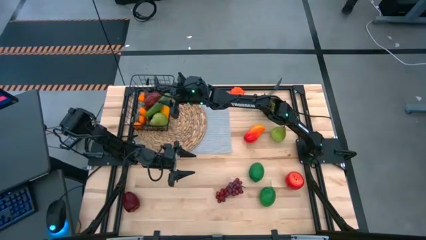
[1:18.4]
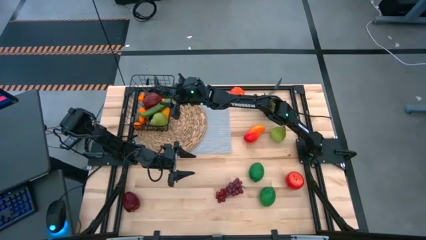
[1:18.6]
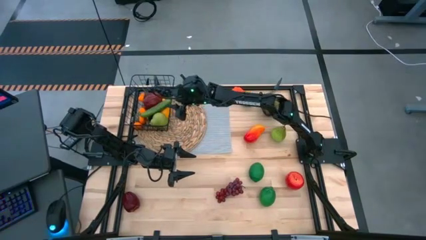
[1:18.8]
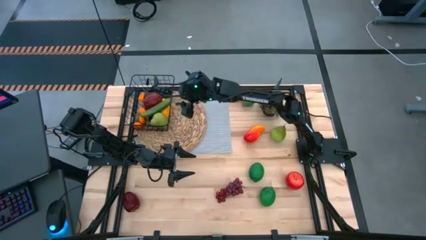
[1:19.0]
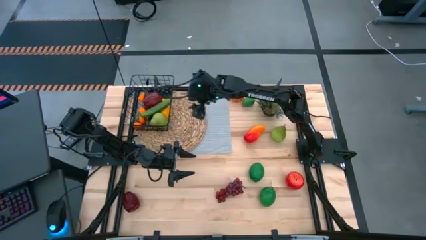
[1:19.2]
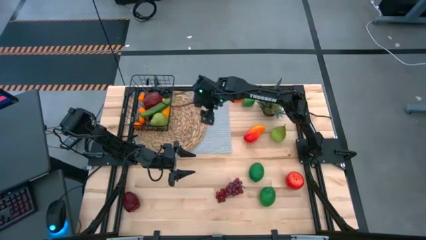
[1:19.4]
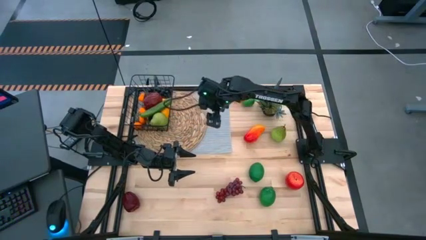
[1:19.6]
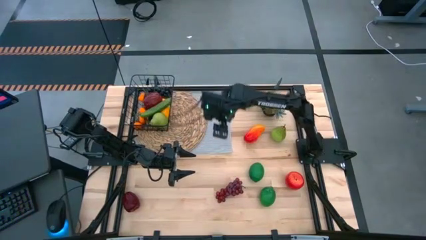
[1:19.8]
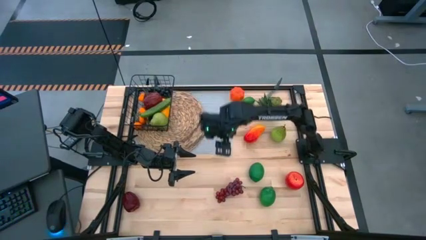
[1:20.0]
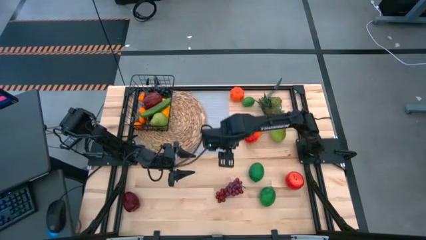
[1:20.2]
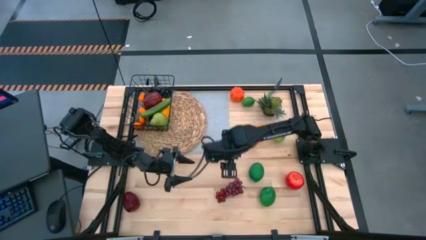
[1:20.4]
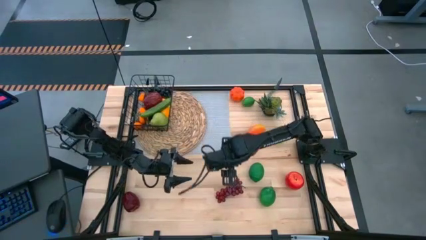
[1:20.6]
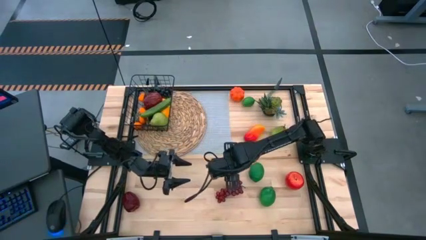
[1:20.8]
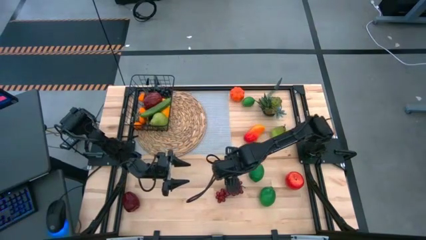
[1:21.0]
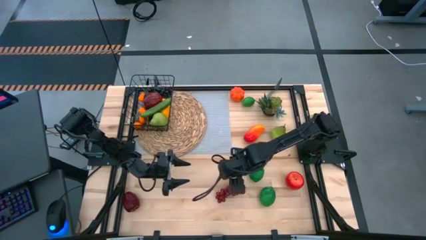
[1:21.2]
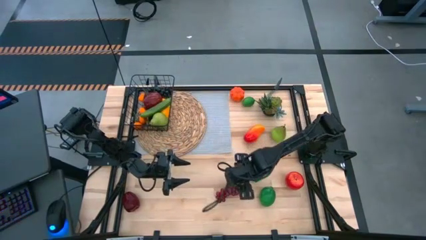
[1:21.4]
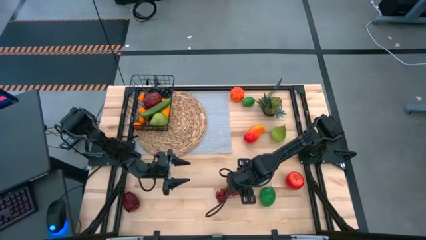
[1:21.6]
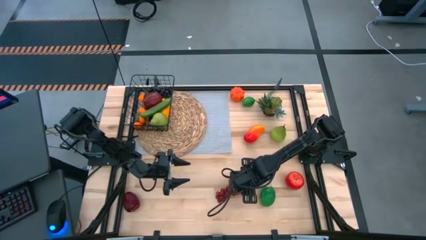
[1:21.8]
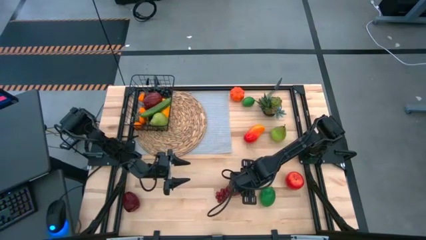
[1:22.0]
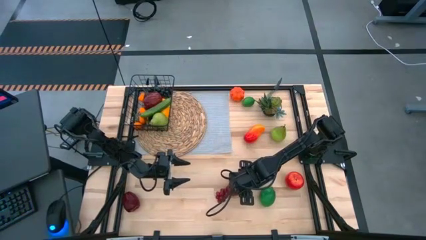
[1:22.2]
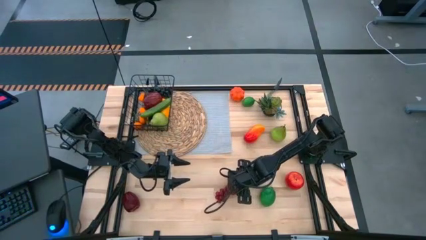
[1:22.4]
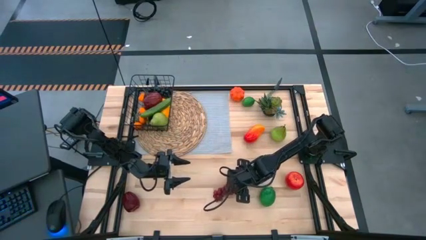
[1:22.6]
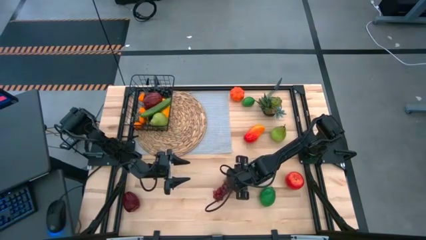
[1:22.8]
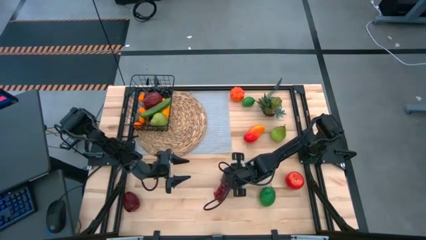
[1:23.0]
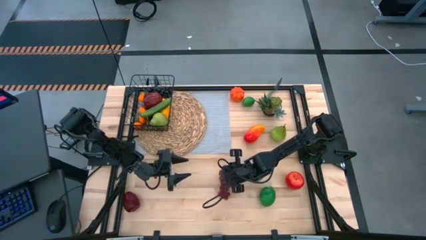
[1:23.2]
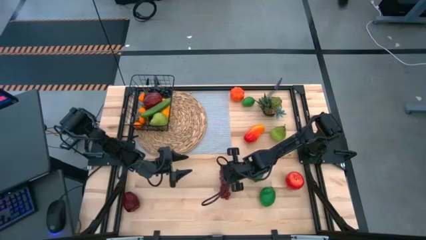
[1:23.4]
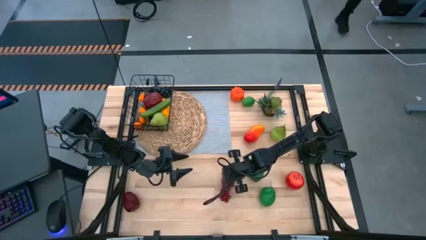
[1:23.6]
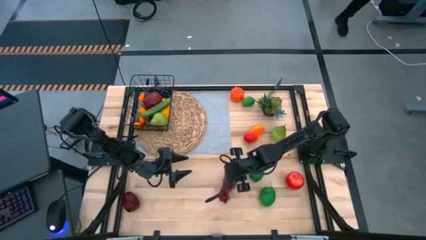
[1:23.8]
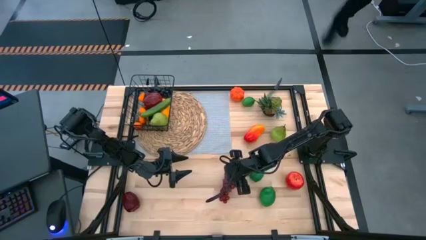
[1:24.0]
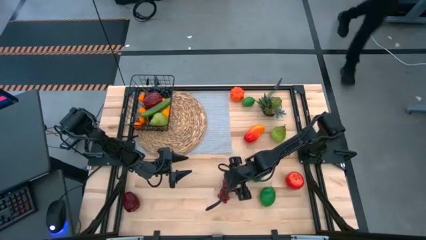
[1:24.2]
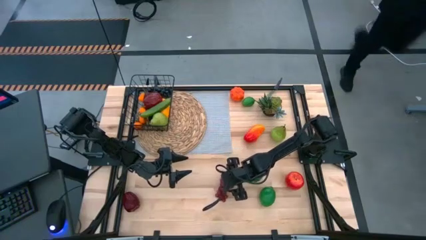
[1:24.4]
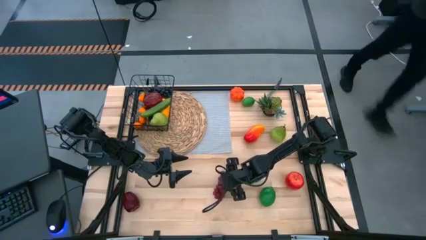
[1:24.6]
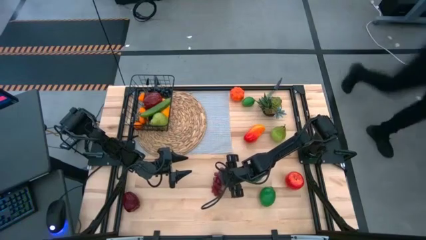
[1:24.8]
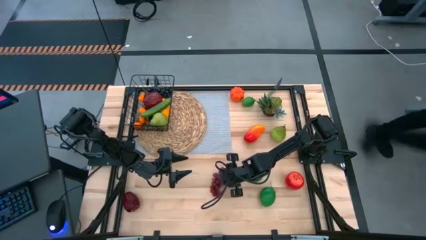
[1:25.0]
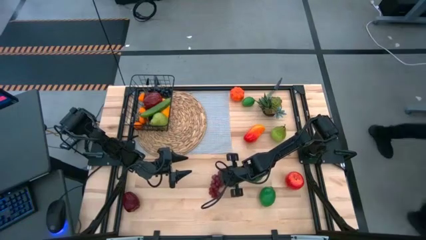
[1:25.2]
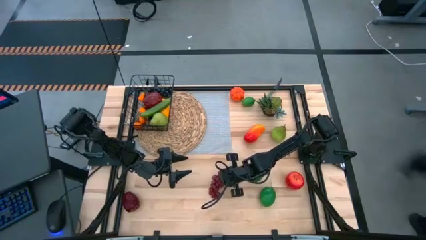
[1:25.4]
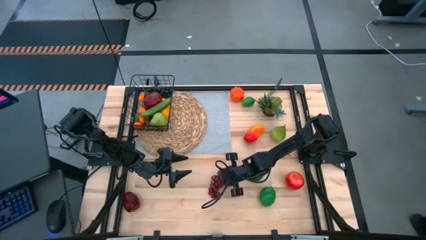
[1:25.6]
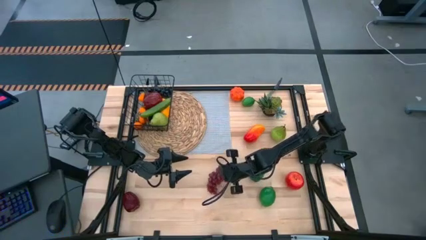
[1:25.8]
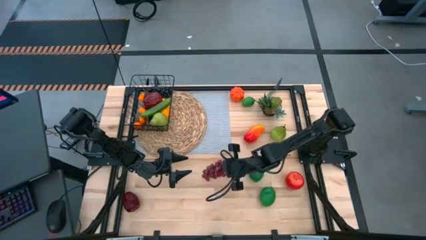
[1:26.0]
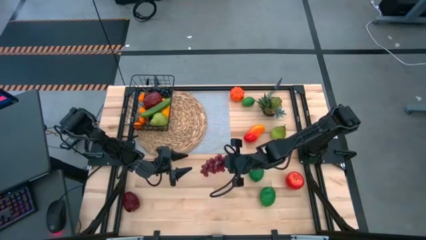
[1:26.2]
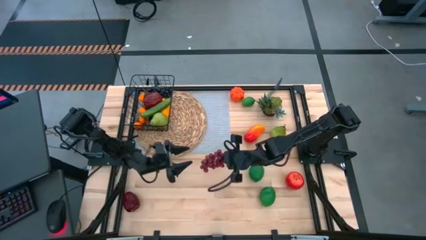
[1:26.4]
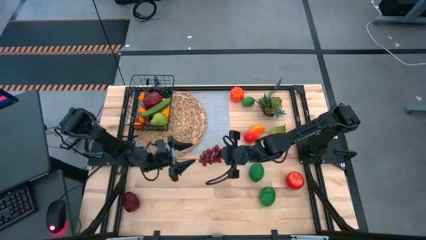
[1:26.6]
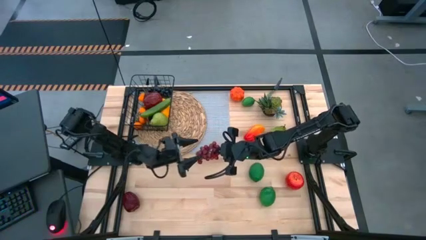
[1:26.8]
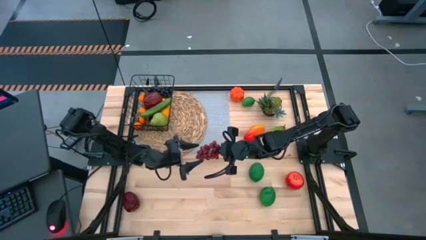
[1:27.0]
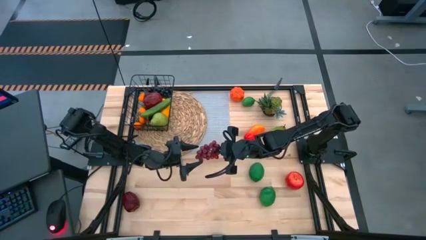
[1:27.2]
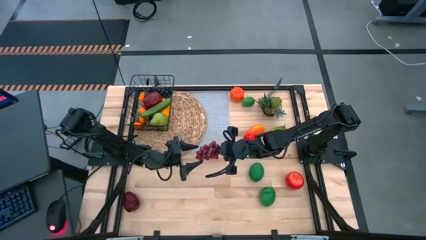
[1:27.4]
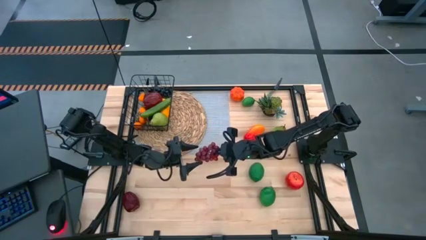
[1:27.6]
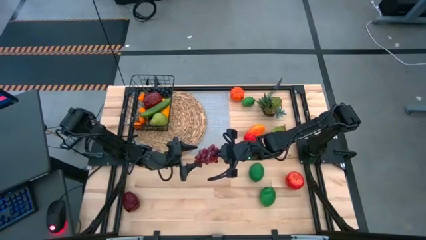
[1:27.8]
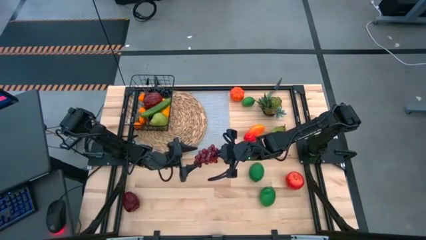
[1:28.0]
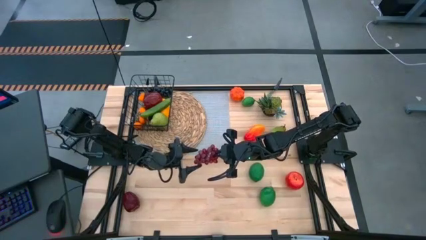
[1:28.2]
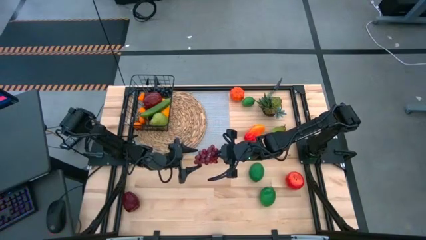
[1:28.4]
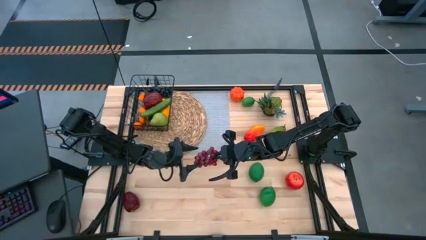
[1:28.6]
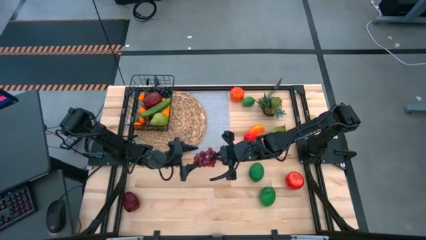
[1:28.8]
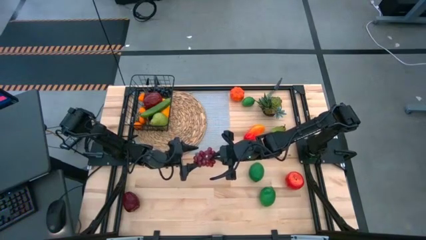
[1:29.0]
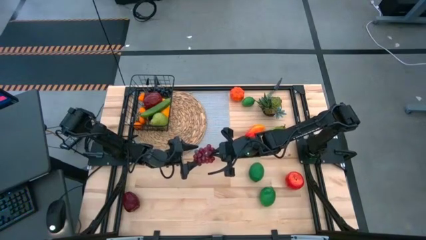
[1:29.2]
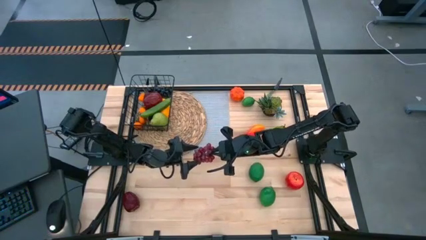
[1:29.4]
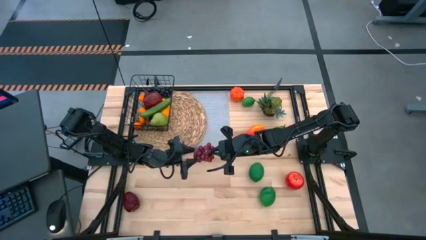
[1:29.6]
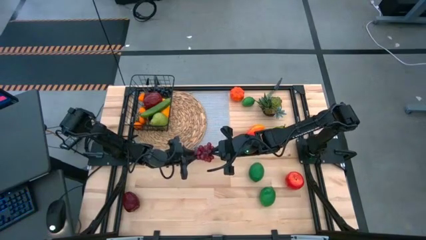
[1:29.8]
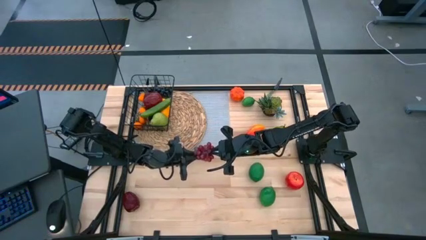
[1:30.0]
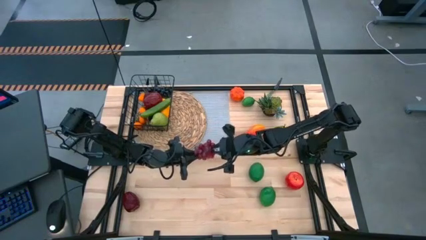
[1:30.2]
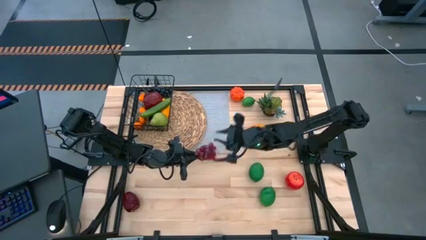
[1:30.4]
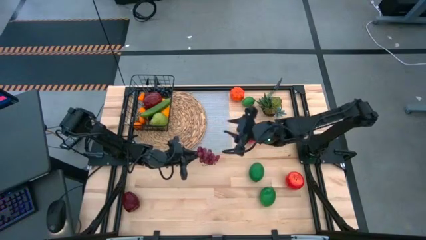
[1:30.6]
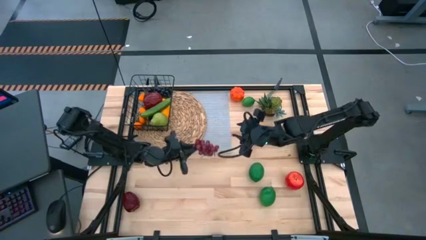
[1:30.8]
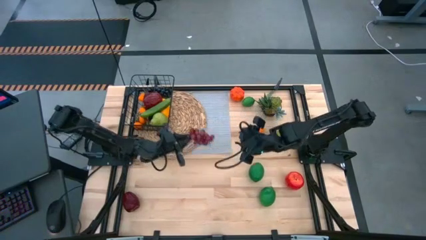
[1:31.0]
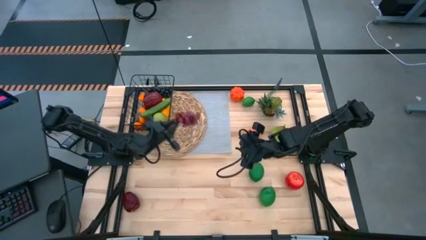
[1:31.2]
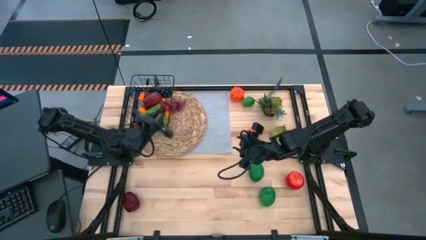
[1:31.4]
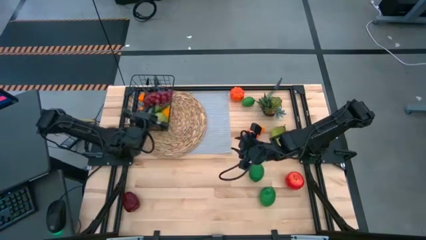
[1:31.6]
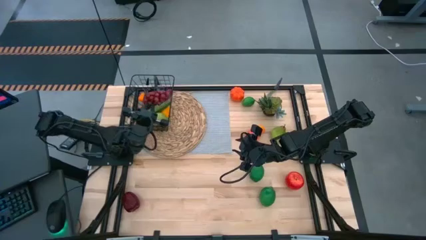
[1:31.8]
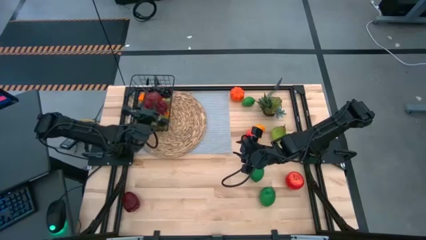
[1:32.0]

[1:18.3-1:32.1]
Task: Build produce basket
Put the red grapes into the wire basket
